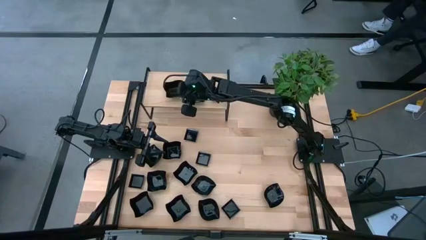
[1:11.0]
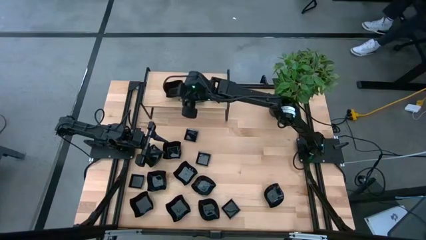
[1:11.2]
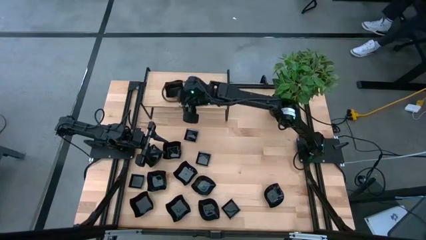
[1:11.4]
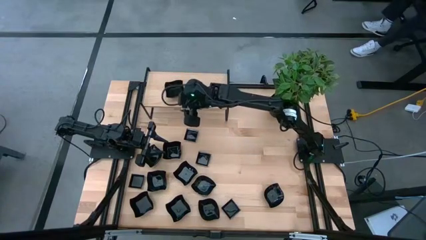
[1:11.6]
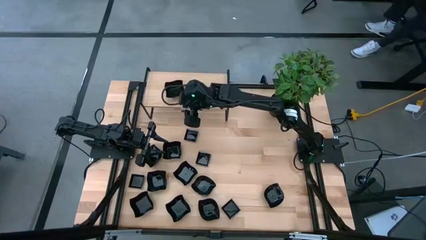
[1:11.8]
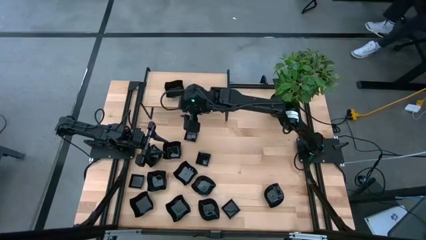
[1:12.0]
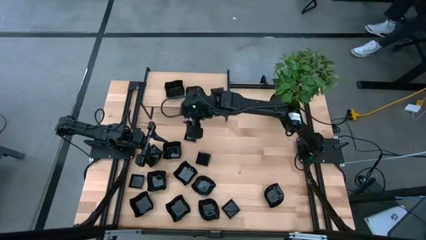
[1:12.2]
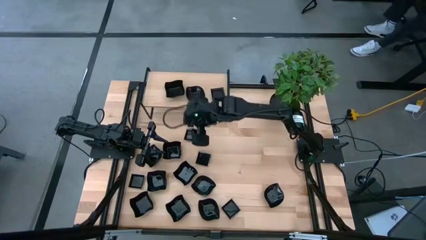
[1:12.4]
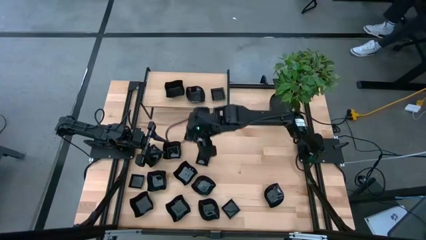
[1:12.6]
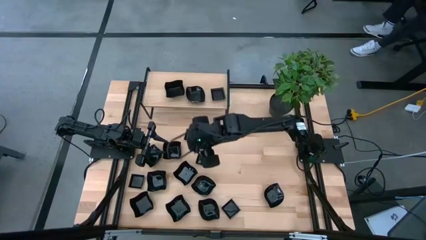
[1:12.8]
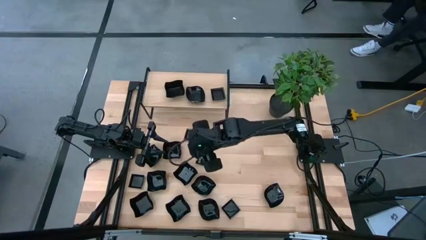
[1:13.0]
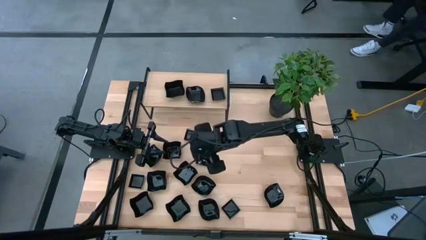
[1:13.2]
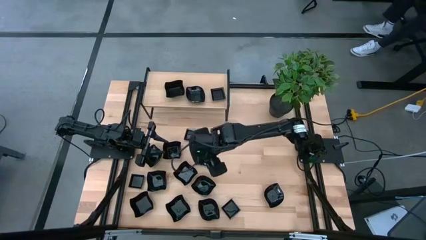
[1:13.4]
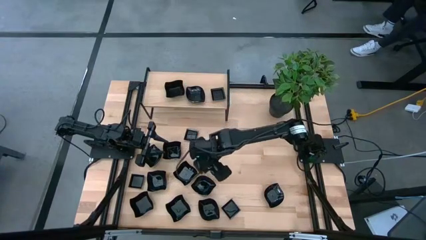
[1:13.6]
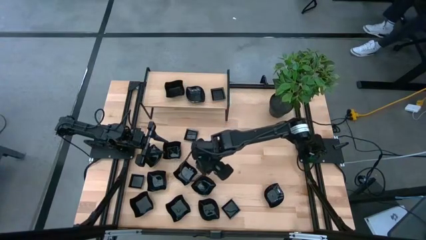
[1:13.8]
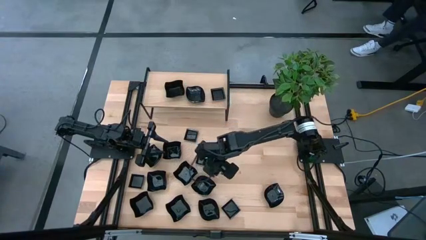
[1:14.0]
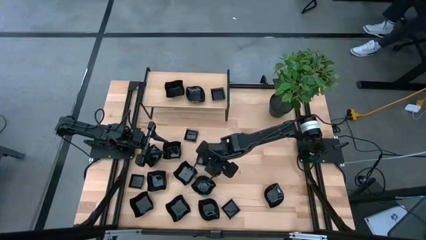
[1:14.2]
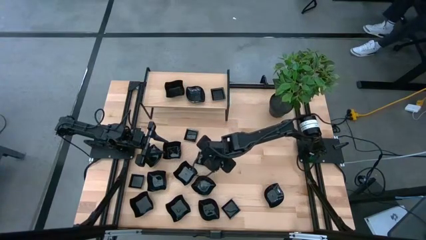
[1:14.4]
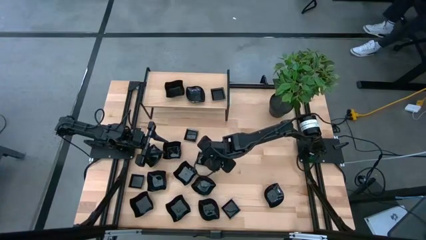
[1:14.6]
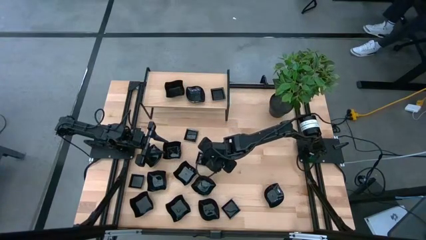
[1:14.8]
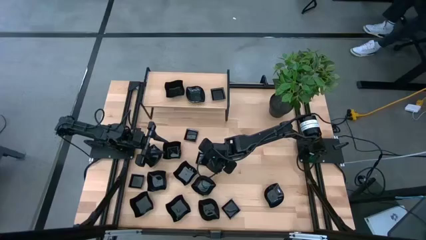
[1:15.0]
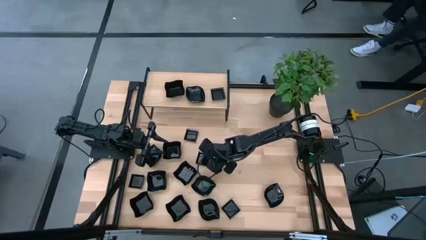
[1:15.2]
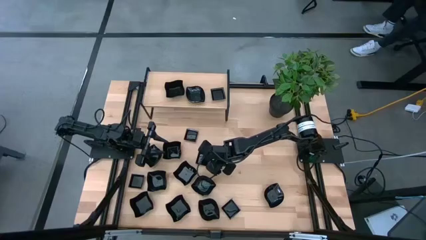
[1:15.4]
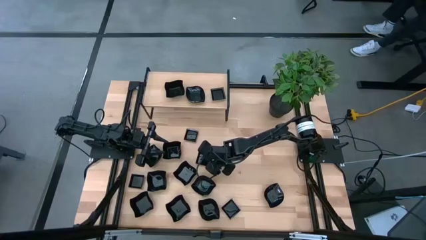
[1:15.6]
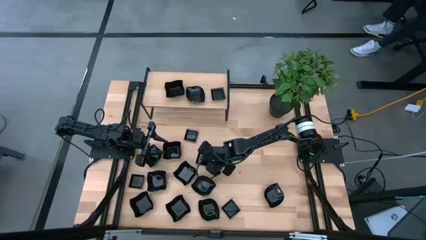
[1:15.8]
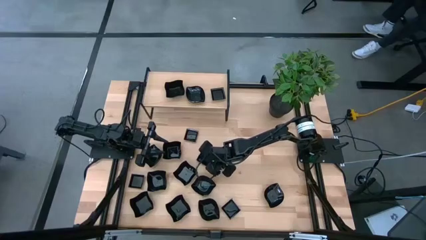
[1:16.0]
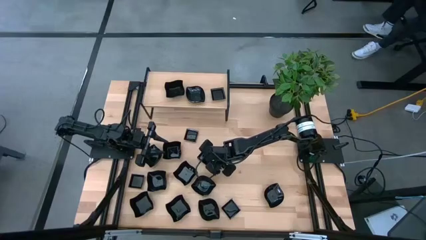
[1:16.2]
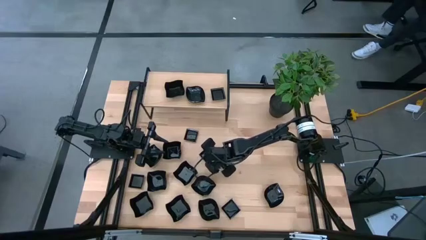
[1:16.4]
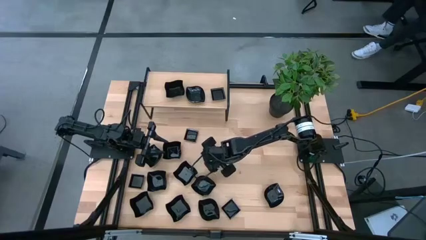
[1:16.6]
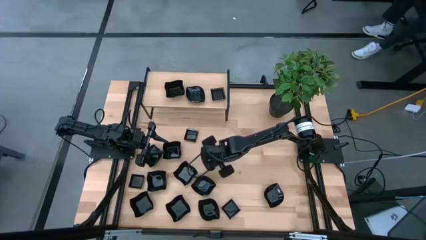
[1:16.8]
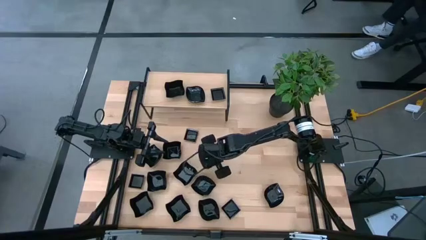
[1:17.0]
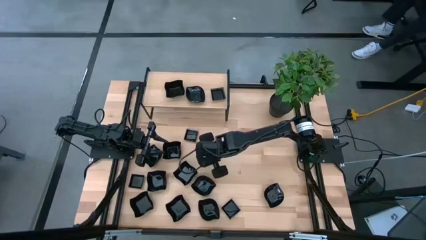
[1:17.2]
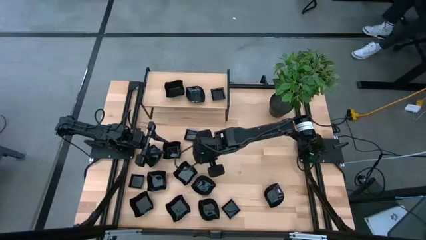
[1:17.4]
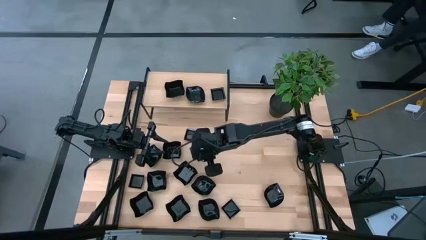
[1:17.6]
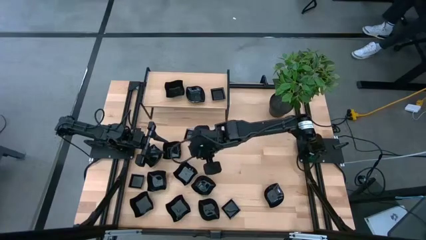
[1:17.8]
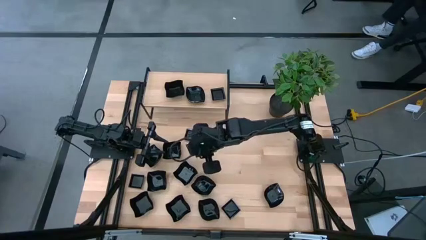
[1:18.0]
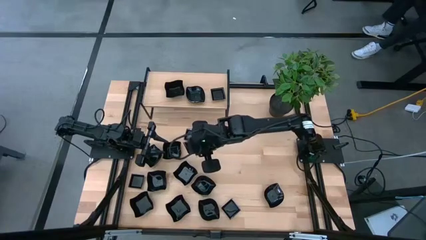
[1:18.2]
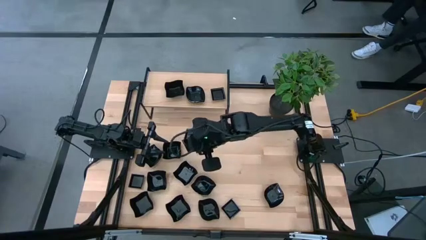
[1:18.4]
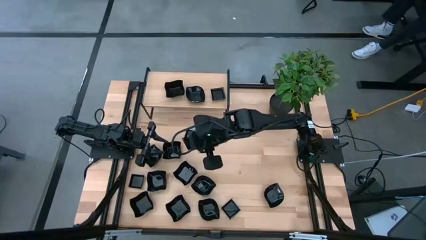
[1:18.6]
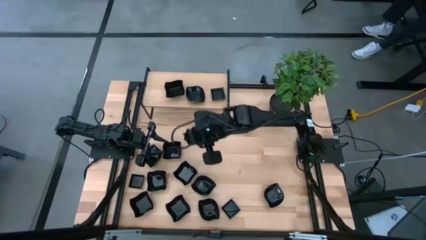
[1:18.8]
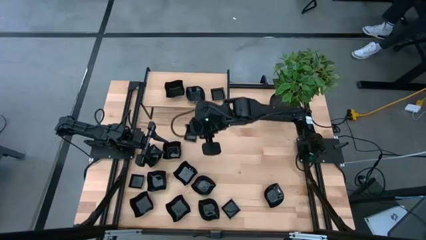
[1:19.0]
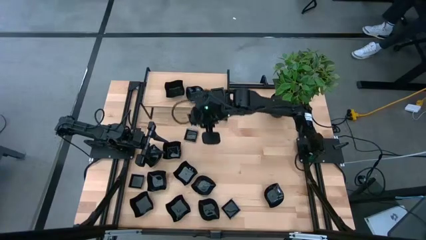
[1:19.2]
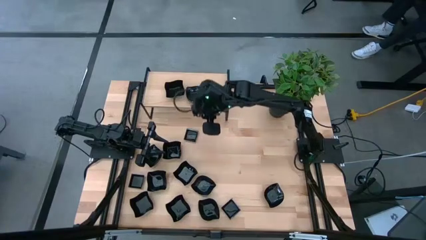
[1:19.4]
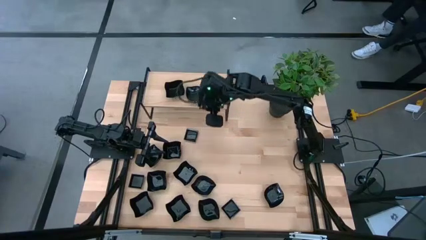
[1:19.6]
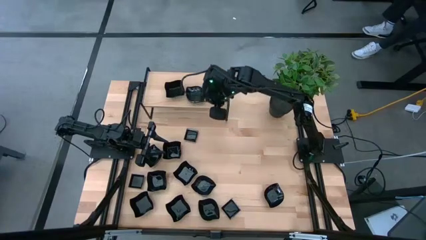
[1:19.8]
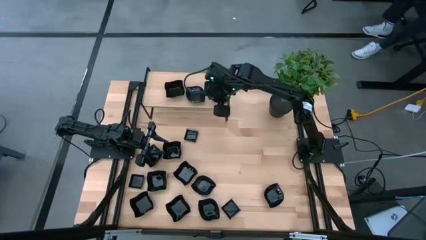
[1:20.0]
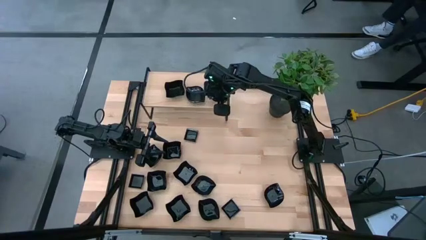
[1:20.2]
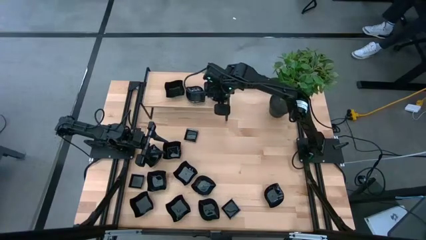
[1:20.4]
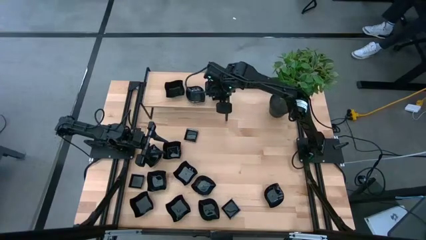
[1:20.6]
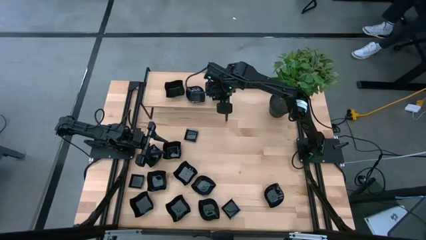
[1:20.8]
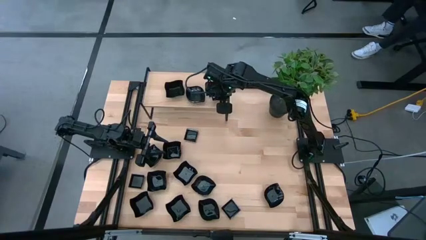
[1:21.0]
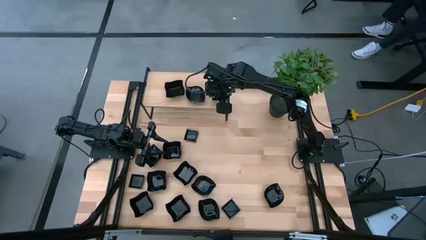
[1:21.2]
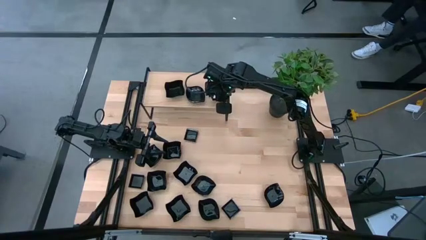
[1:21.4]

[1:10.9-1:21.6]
Task: Pick & Place Mini shaped plates
Stack the square plate on top of the square plates on the shelf

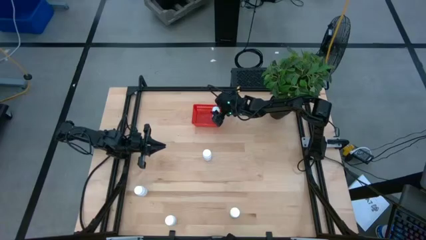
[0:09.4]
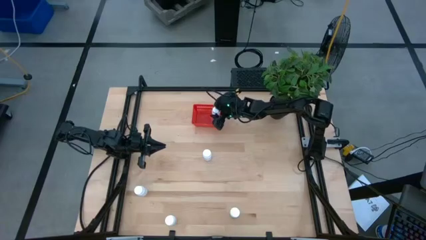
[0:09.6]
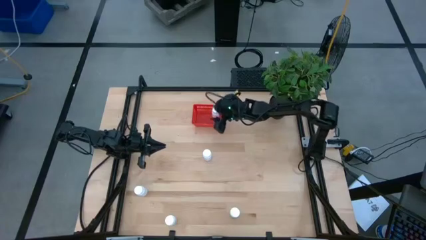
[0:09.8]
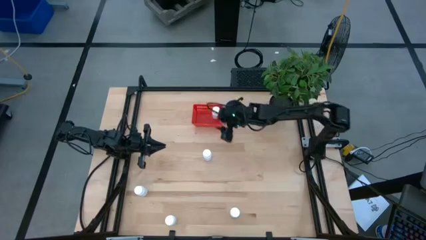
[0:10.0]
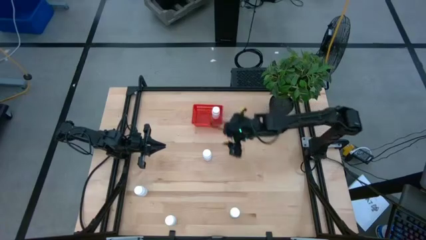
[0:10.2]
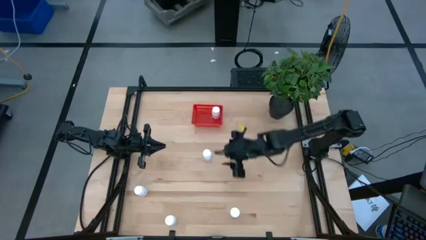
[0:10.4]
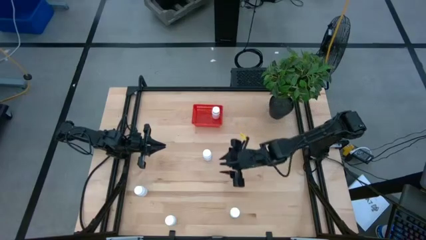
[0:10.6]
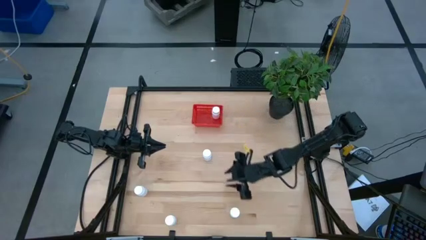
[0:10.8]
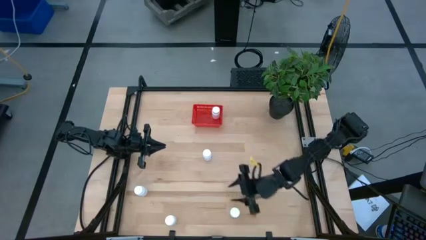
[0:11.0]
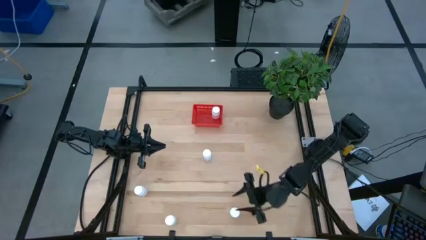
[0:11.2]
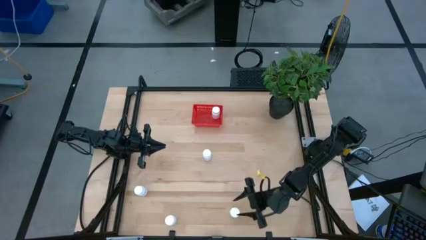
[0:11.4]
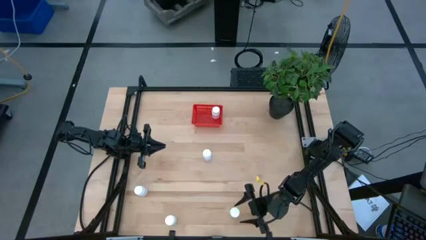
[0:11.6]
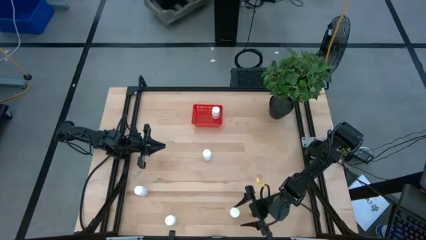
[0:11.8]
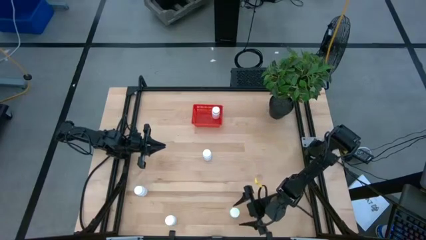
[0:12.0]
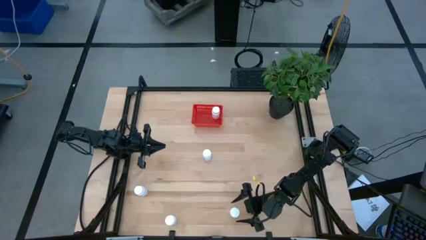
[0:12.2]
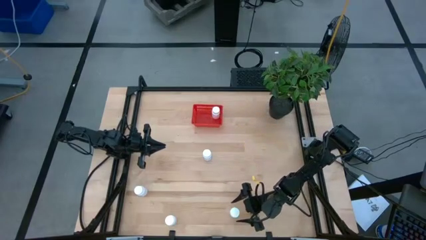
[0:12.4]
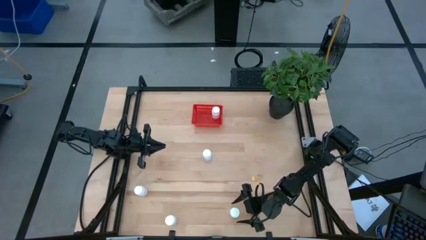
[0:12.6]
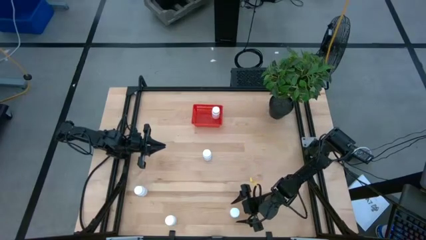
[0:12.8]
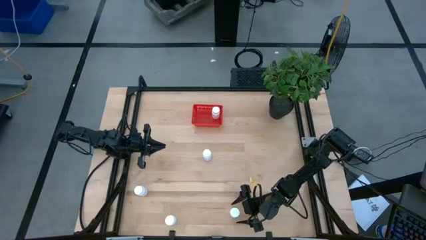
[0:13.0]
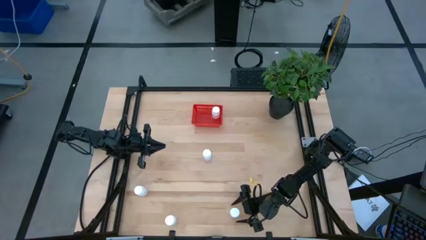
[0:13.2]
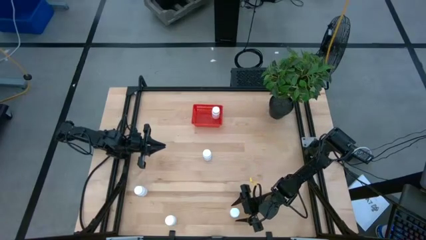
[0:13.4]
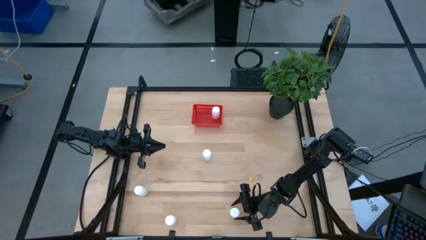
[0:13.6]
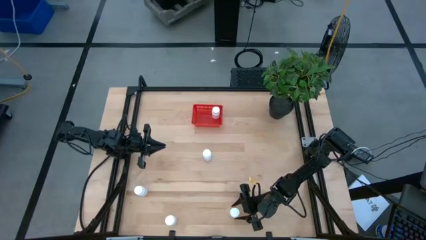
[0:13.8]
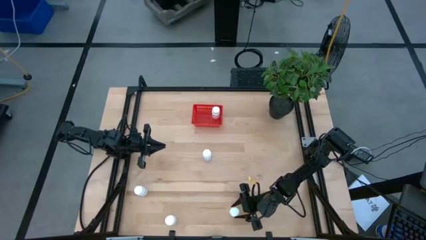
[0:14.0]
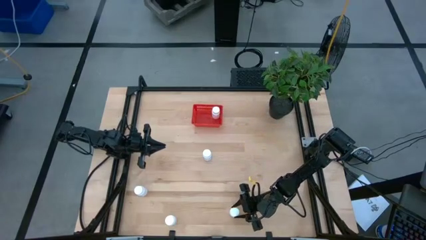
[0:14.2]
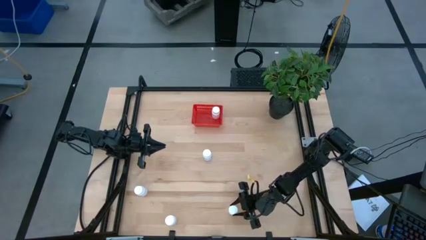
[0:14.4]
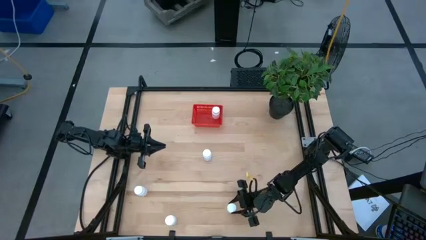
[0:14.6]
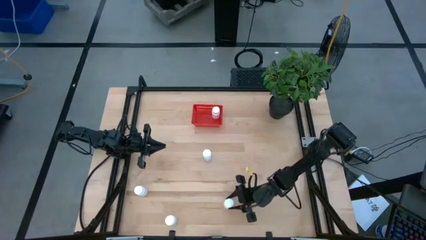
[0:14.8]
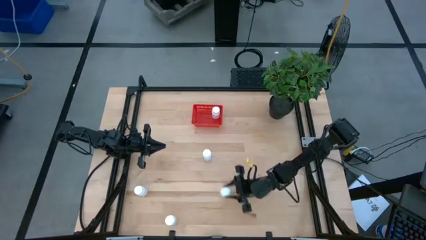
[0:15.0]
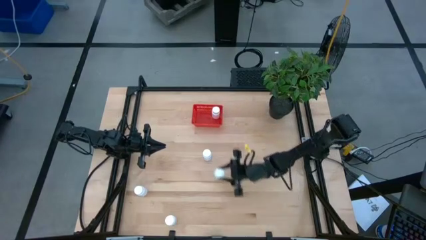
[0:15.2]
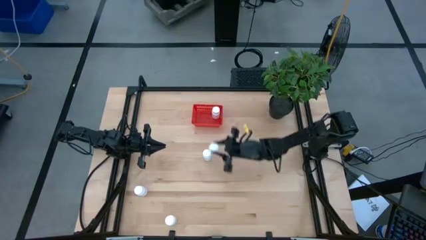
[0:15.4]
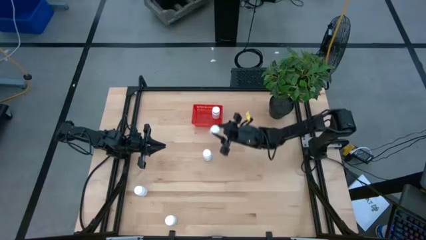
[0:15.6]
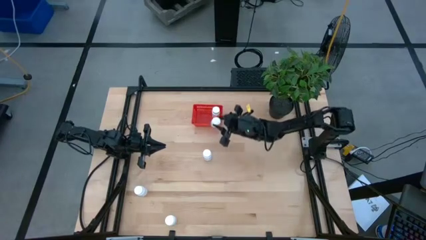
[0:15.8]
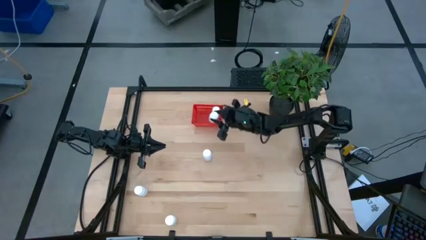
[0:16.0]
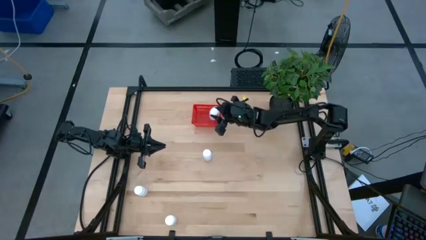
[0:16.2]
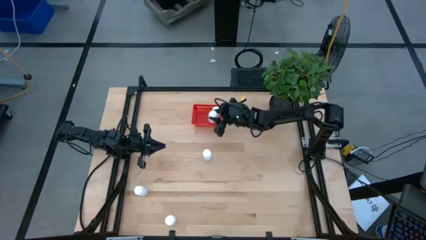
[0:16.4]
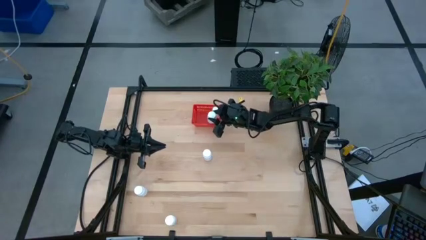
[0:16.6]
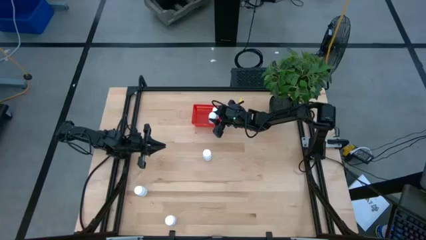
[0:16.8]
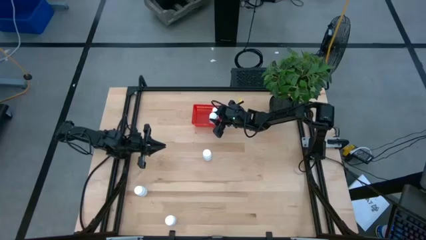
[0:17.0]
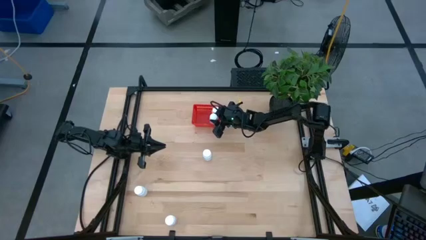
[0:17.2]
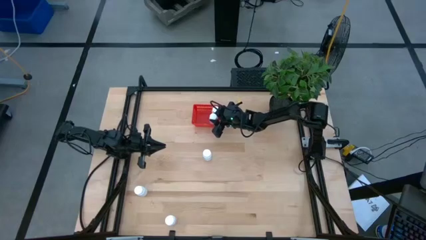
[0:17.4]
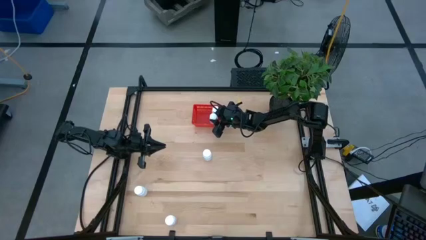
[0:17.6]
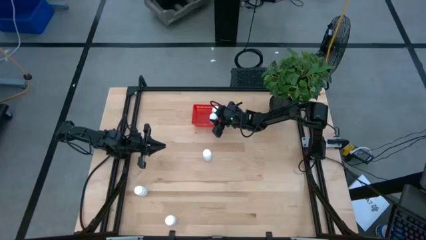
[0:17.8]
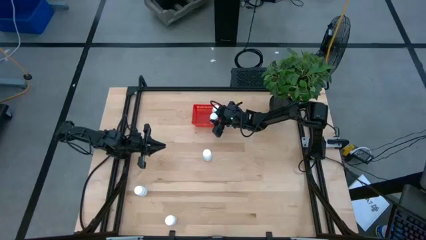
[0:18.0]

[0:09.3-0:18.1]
Task: Pick and place pill bottles into a basket
Put the white pill bottle into the orange basket
